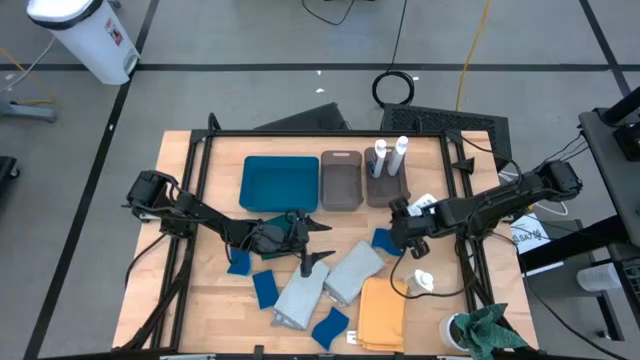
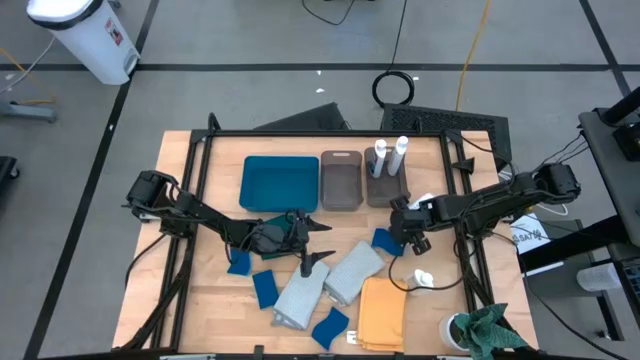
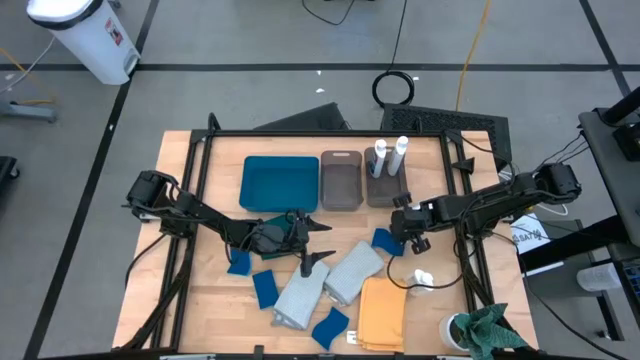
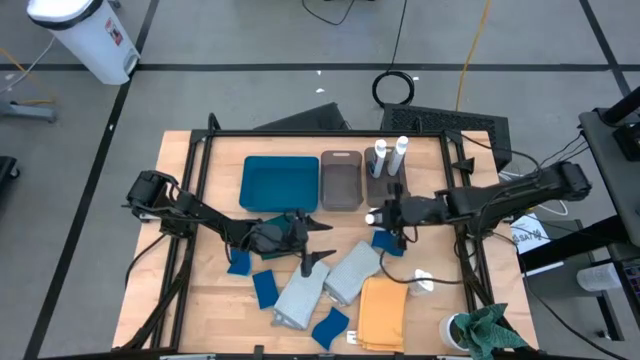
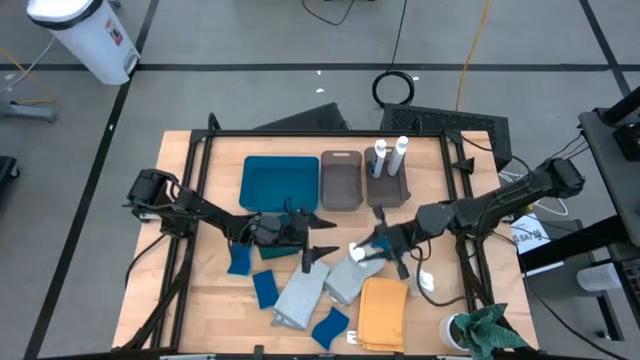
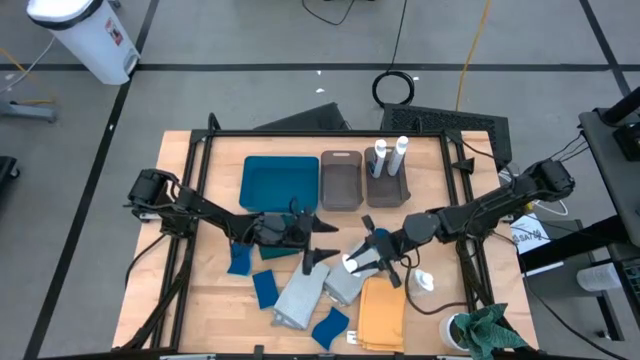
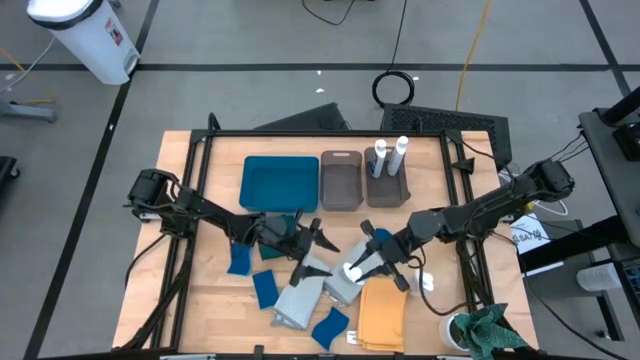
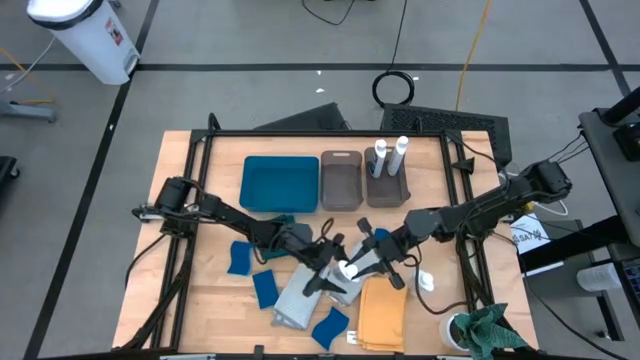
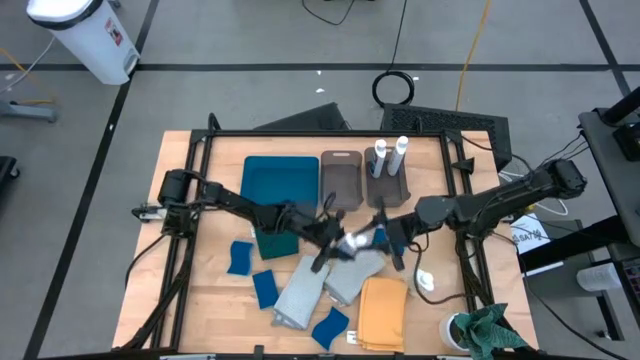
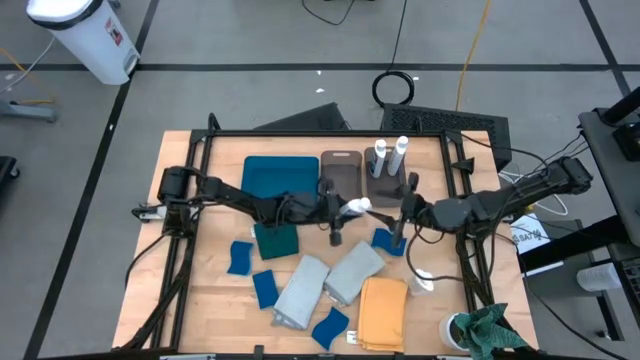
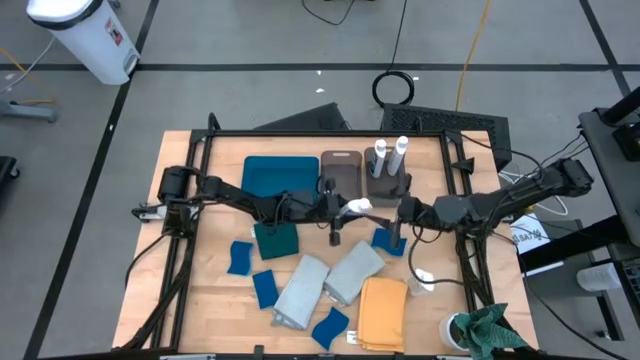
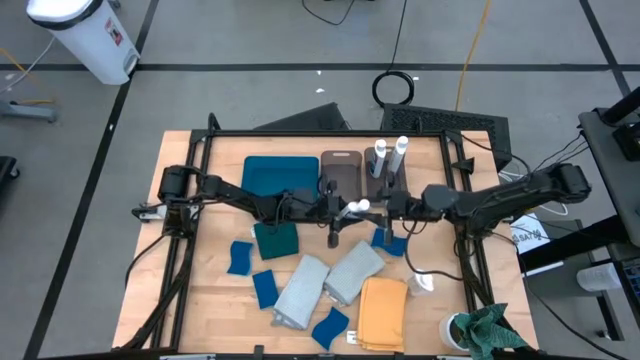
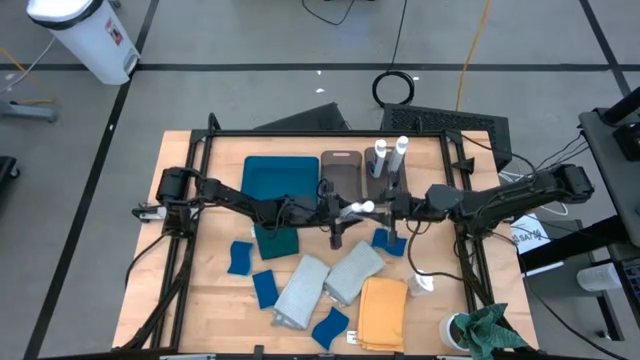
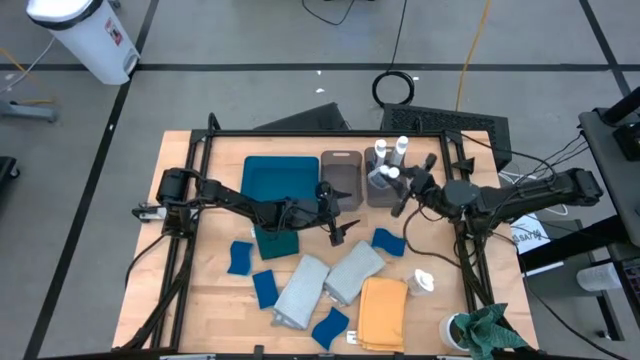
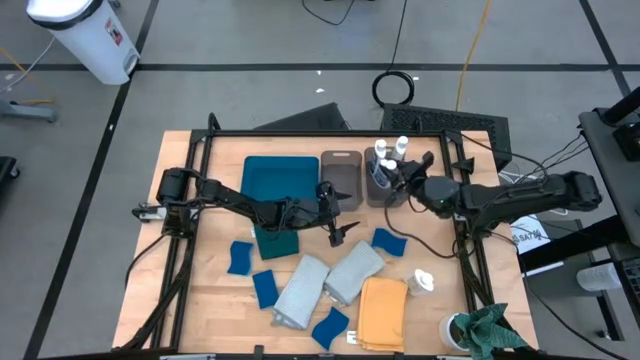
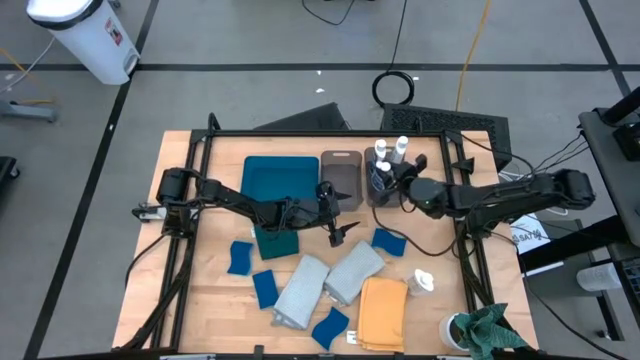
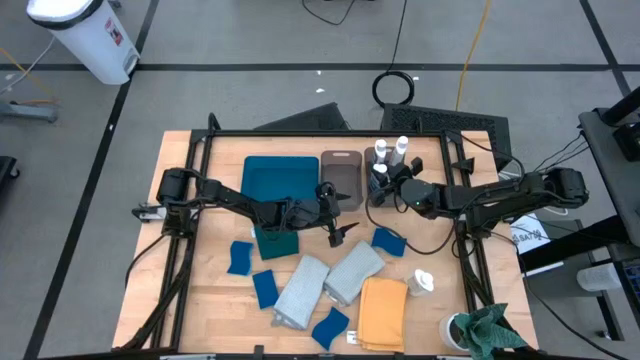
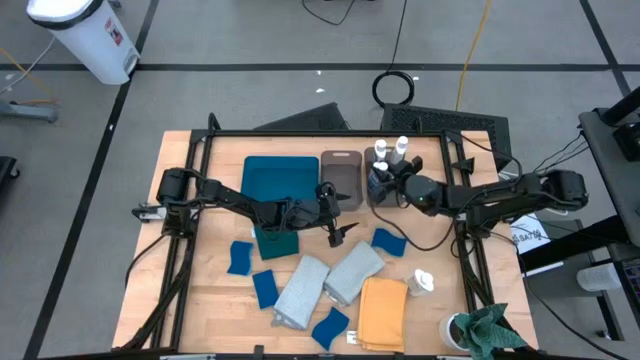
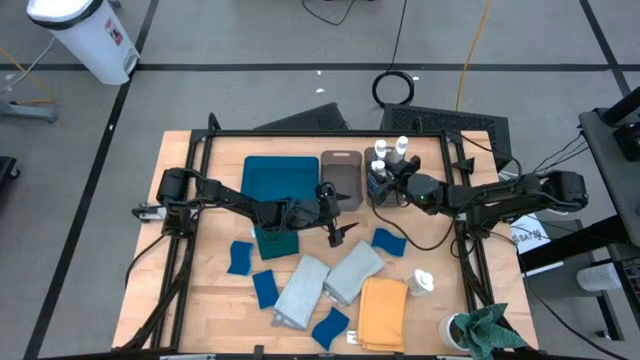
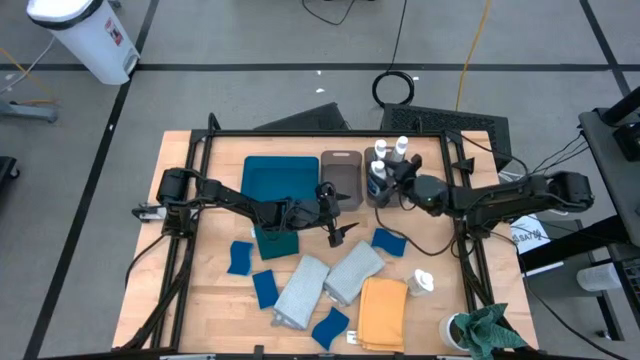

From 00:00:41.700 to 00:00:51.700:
Task: Pick & Place Kitchen Items
Put the white plastic restorer bottle into the right black bin

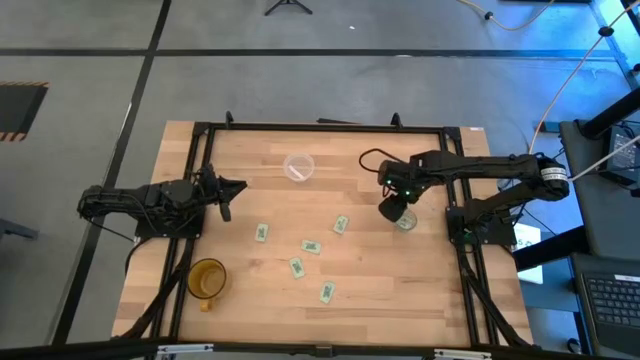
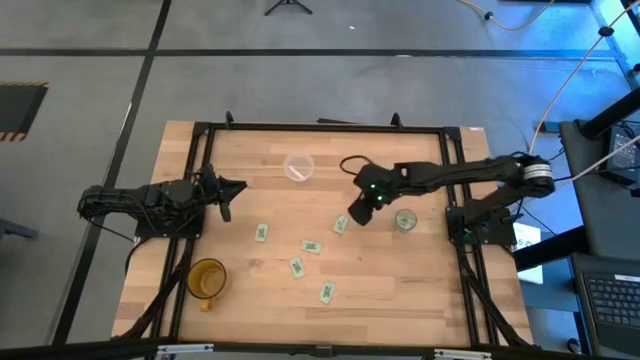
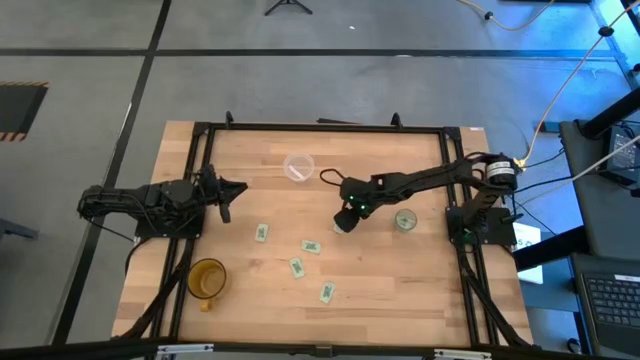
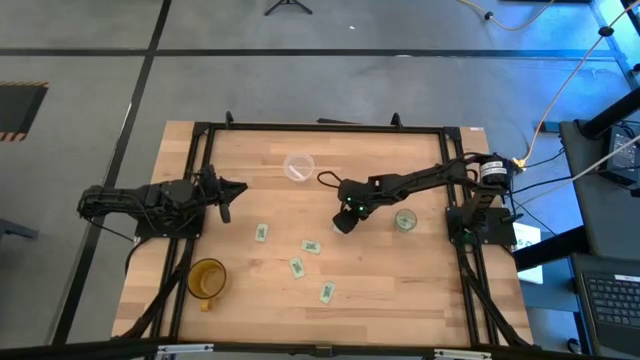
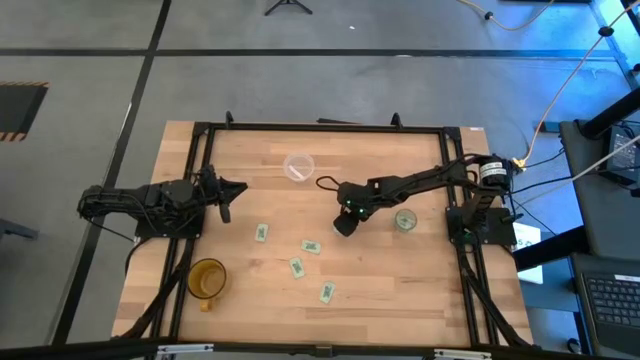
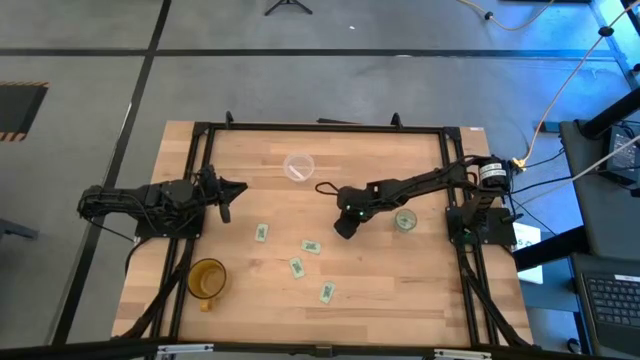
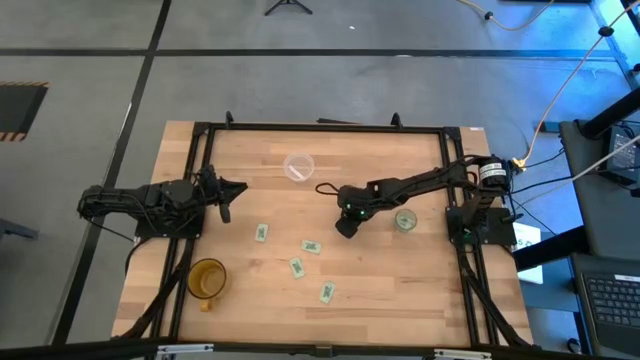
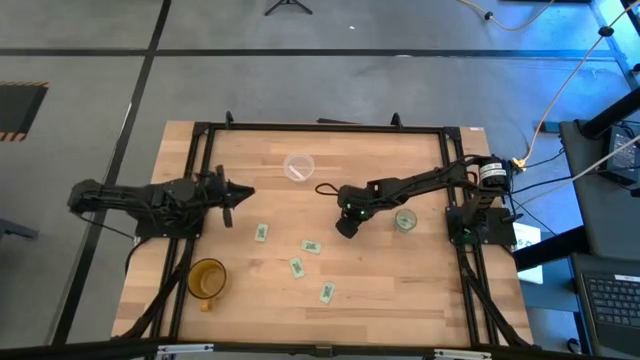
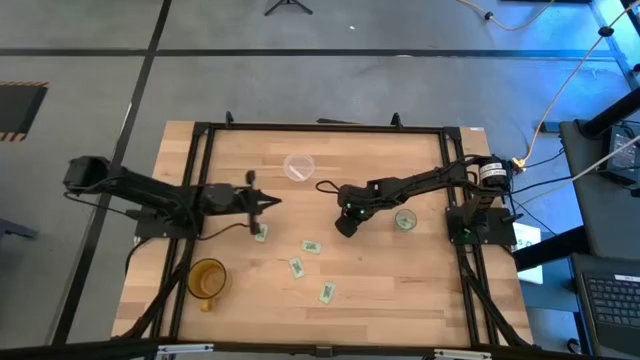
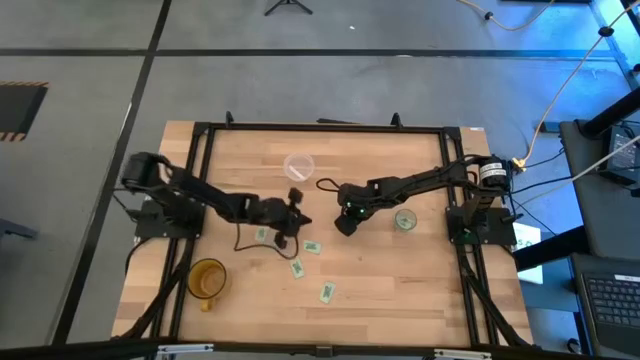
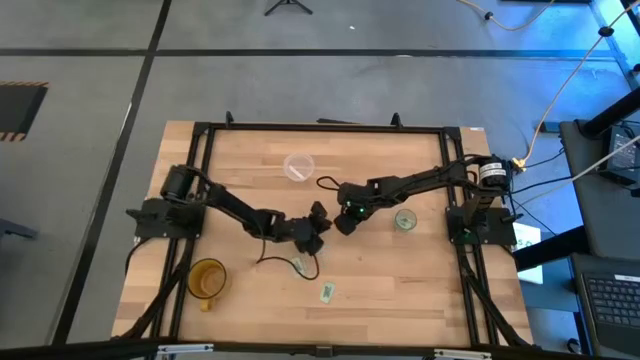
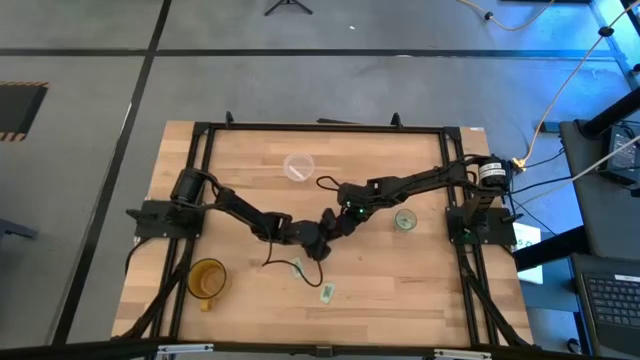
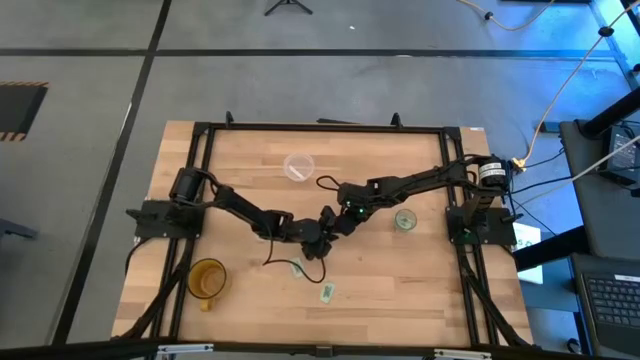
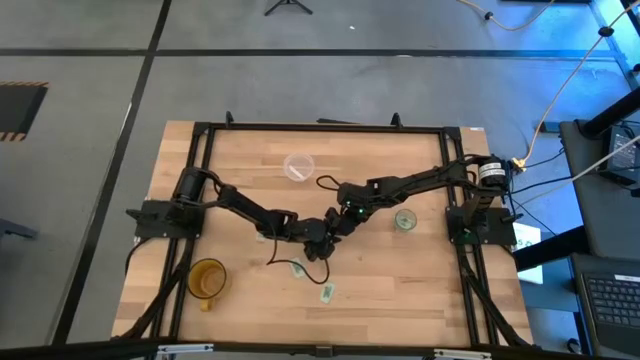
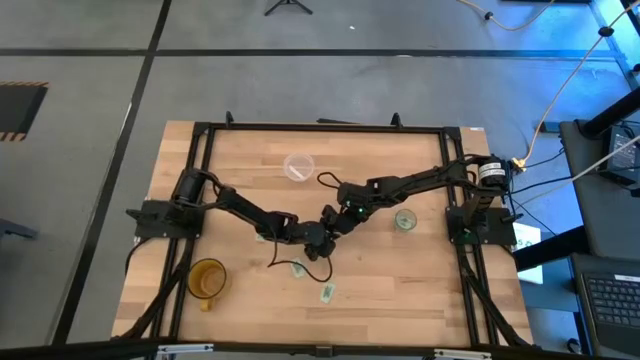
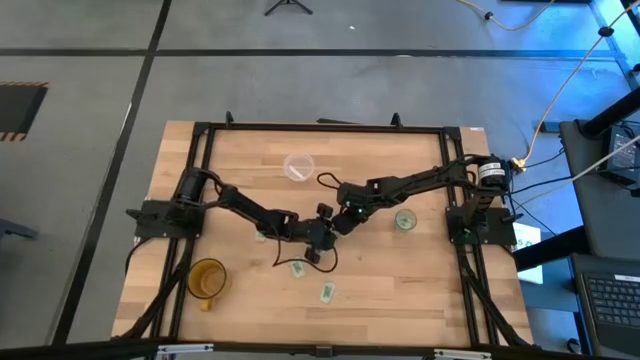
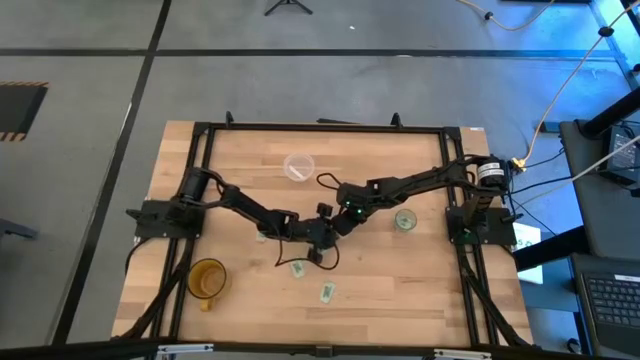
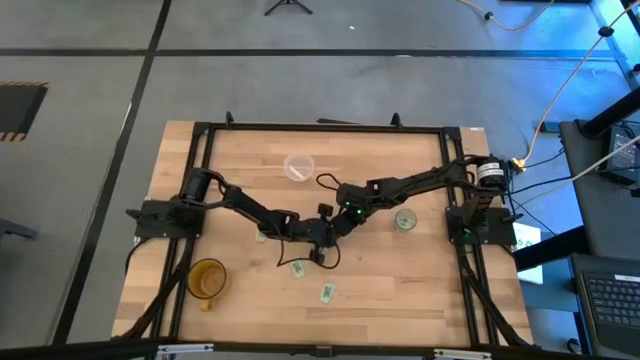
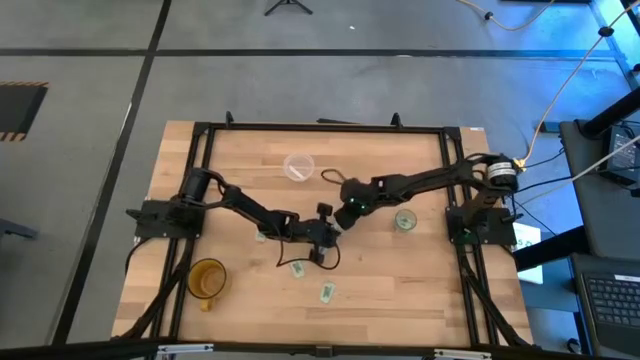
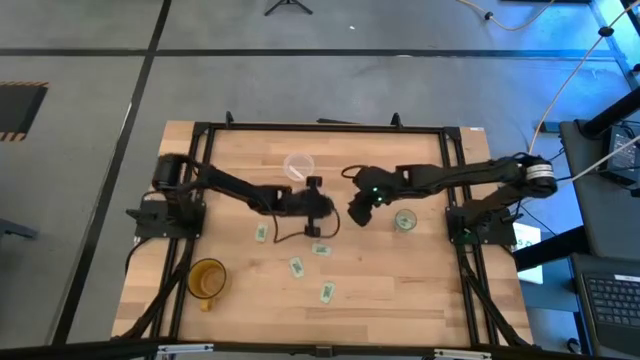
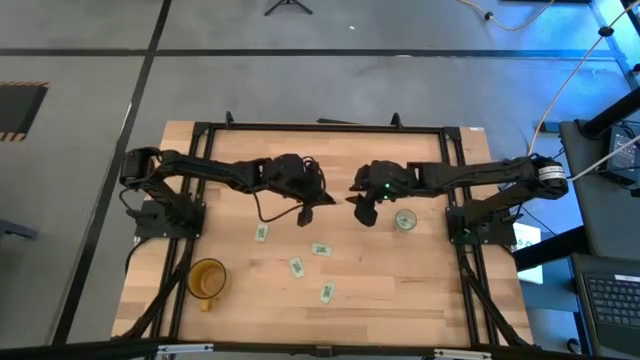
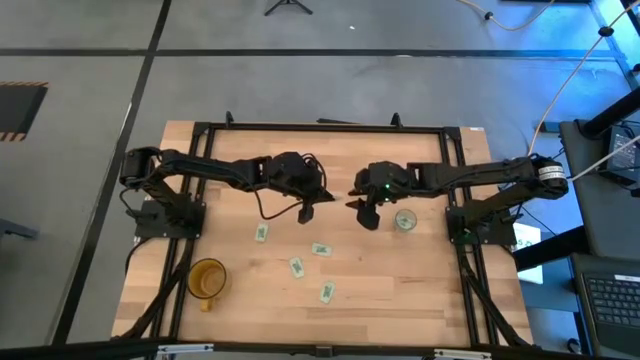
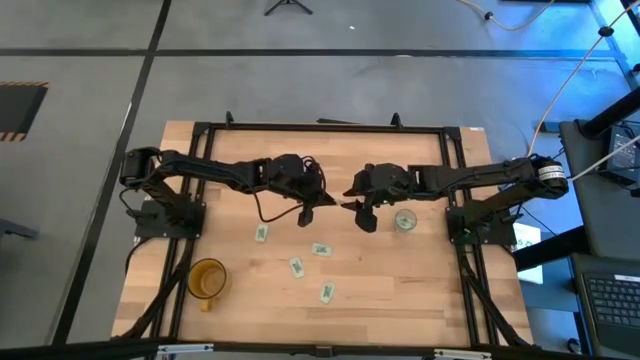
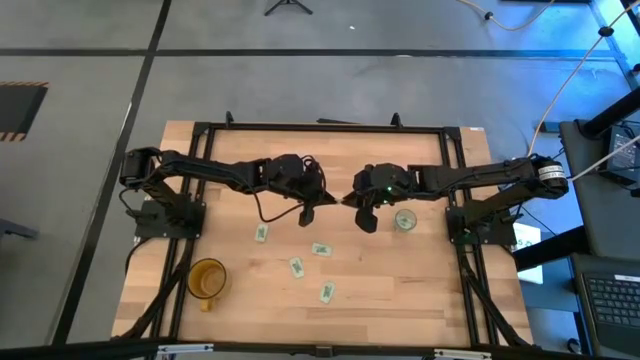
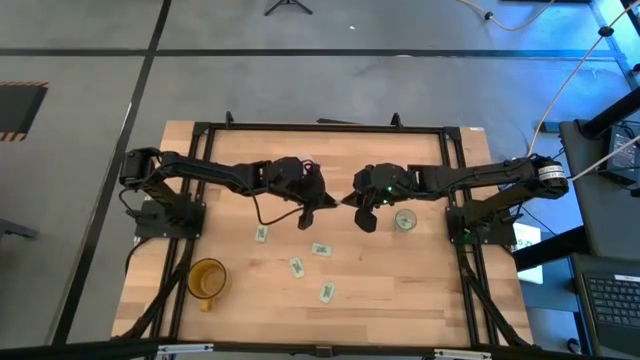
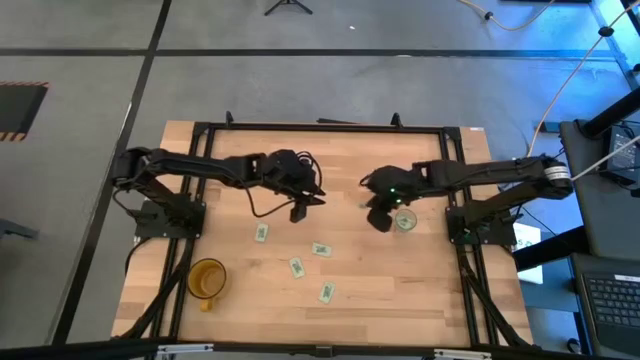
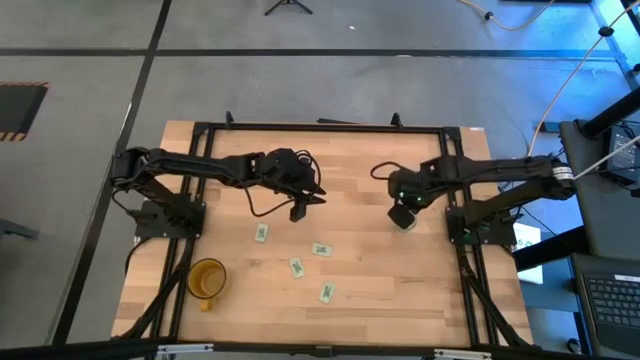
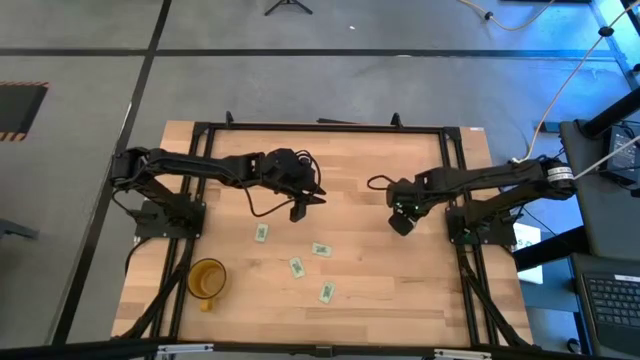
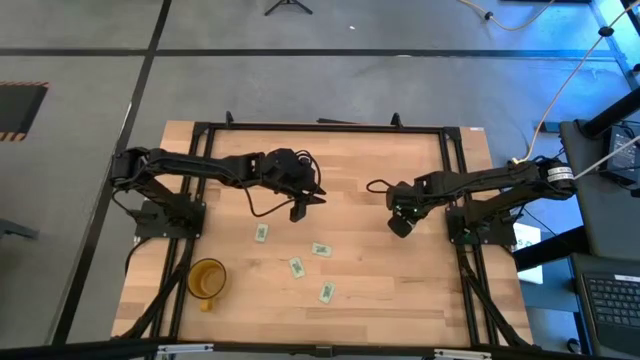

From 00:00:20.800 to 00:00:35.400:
Task: Pick and place Stevia / Truvia into bins
Put the stevia packet into the transparent container
